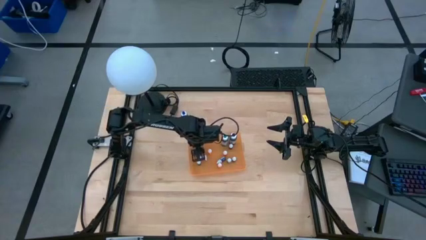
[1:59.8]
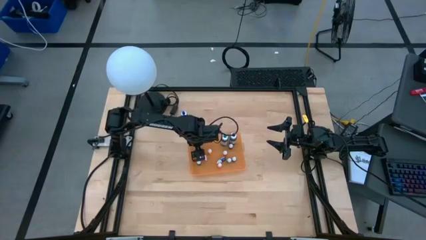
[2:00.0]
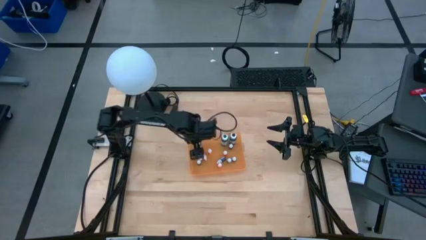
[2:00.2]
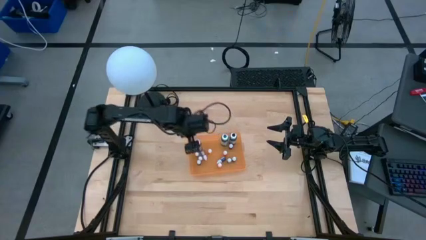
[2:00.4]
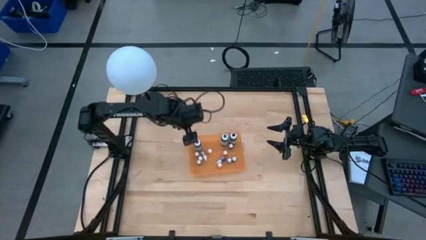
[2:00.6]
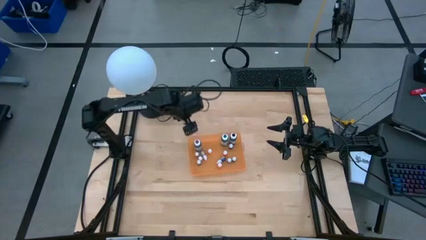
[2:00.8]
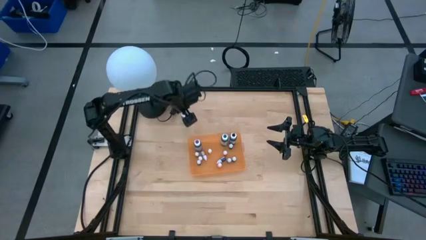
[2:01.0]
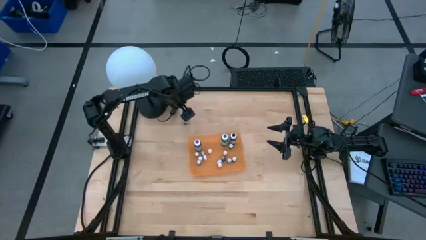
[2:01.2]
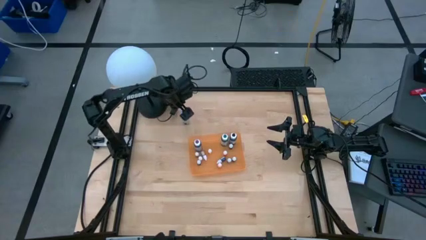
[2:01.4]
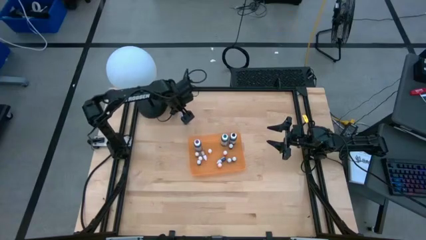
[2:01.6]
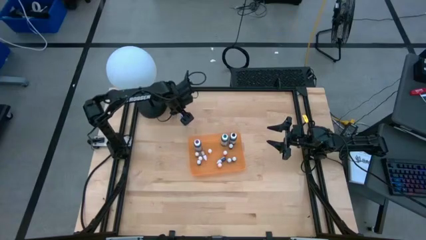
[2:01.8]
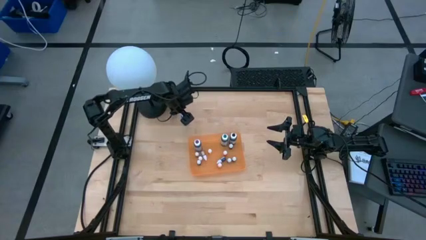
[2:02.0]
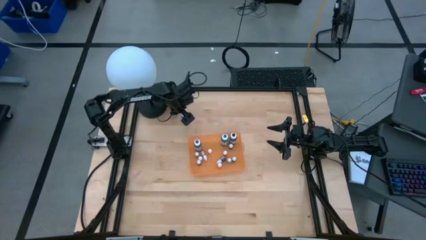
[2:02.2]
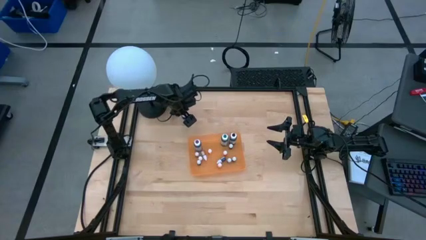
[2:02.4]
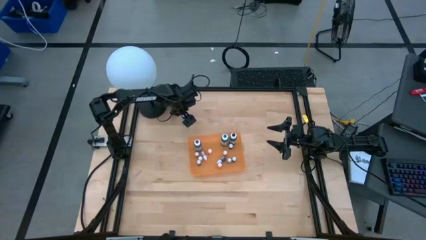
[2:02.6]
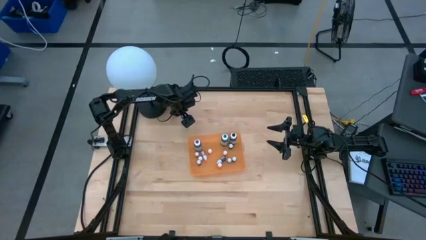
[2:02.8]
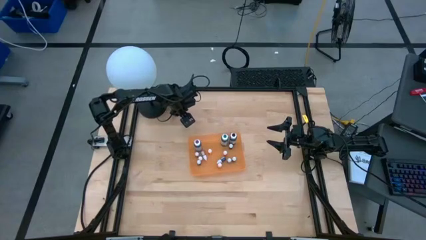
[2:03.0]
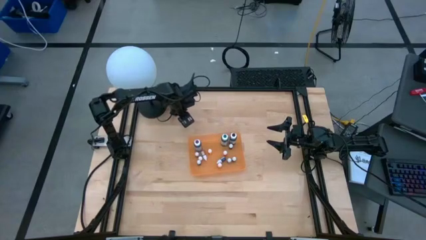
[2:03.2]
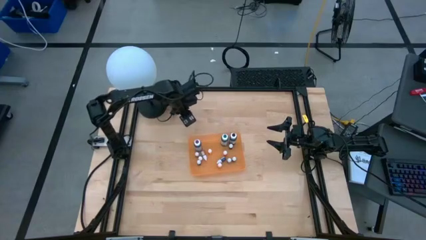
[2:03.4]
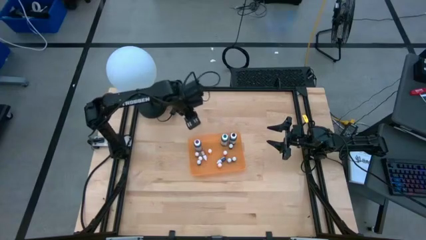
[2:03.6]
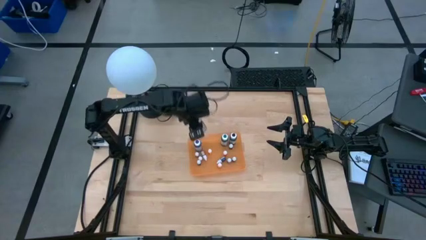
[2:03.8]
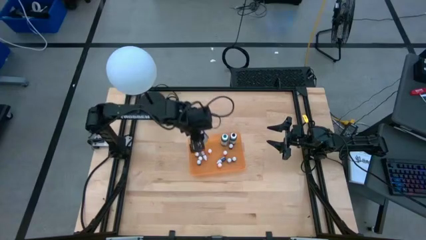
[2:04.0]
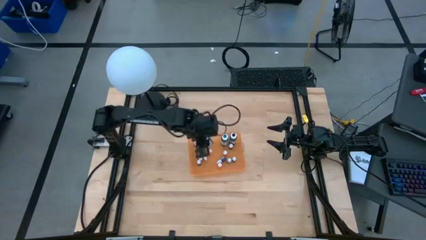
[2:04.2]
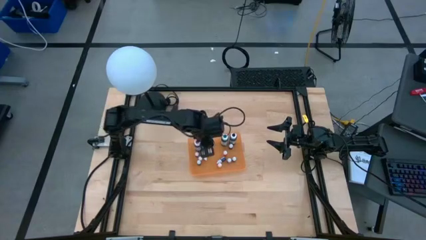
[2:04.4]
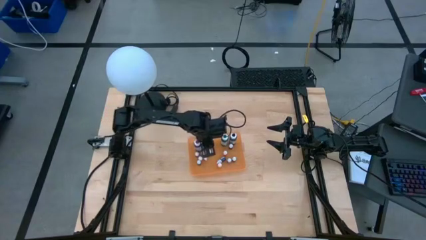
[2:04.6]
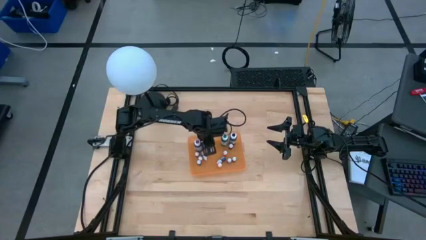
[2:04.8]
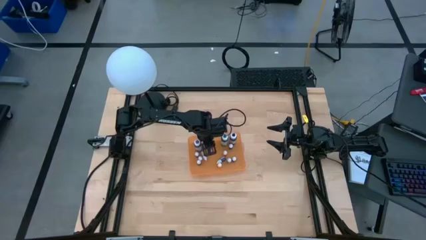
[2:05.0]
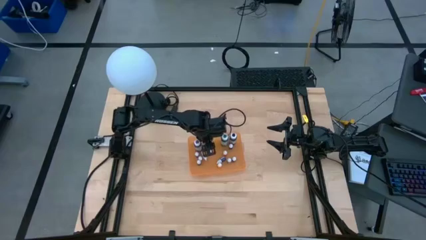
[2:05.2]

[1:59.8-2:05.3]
Task: Pick & Place food coloring
Put the large blue food coloring bottle into the orange bin

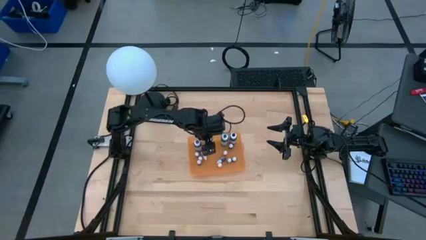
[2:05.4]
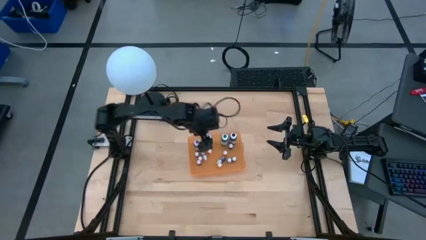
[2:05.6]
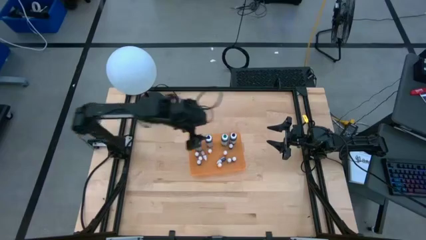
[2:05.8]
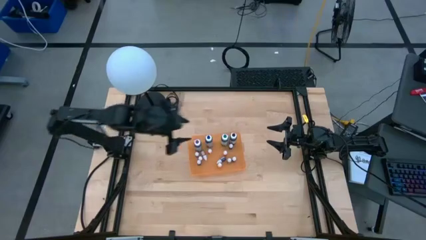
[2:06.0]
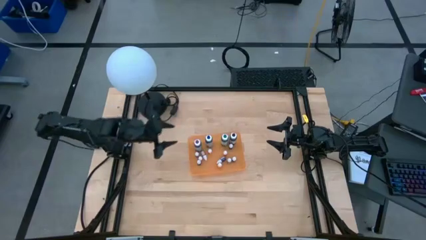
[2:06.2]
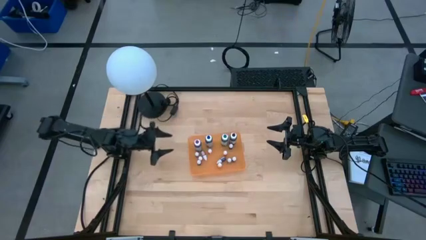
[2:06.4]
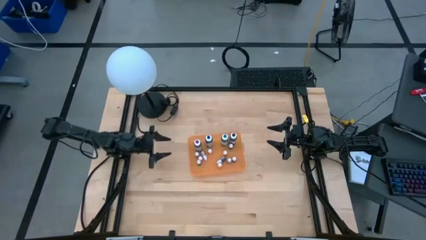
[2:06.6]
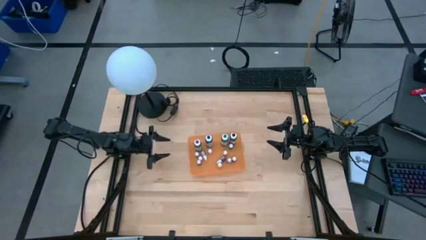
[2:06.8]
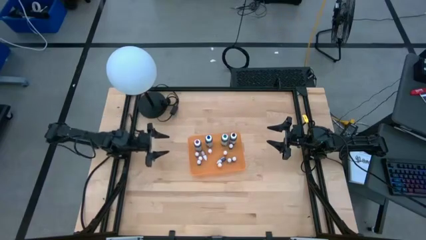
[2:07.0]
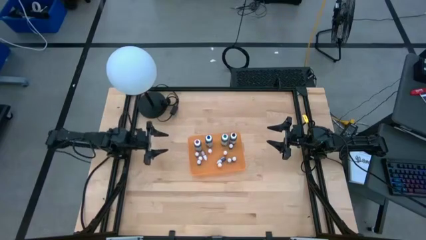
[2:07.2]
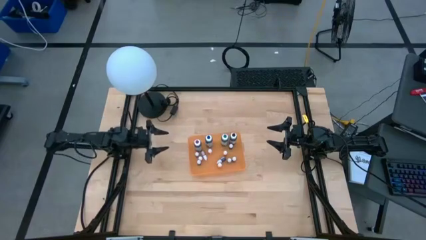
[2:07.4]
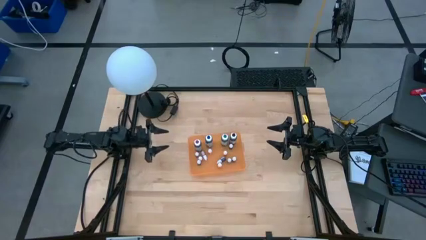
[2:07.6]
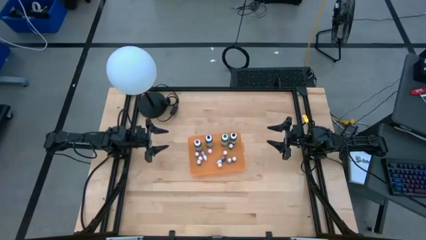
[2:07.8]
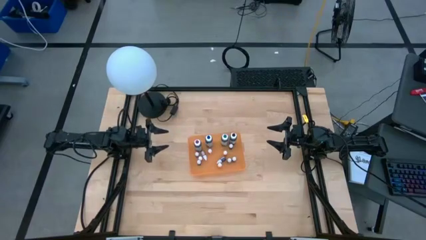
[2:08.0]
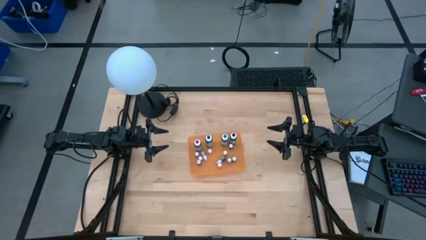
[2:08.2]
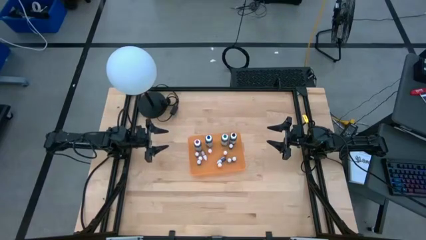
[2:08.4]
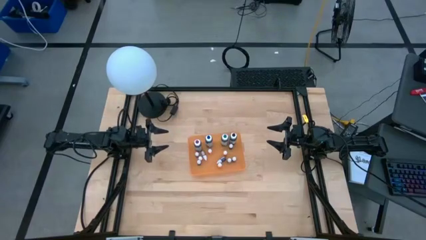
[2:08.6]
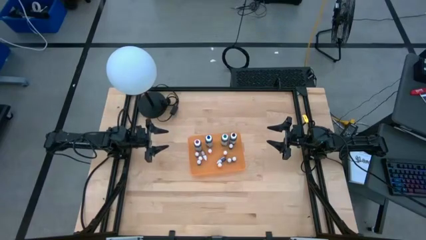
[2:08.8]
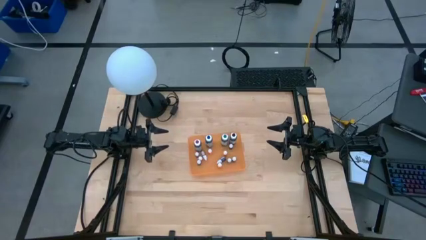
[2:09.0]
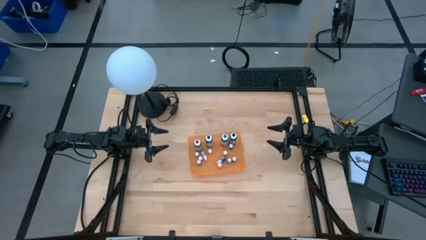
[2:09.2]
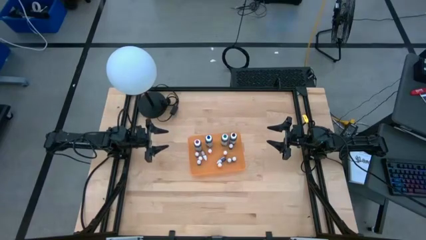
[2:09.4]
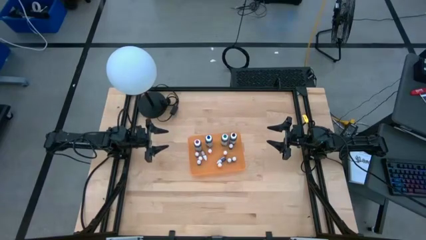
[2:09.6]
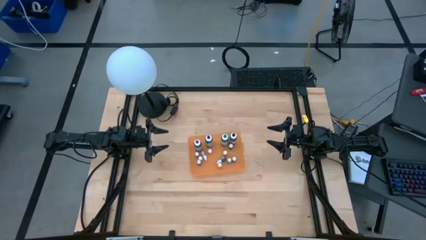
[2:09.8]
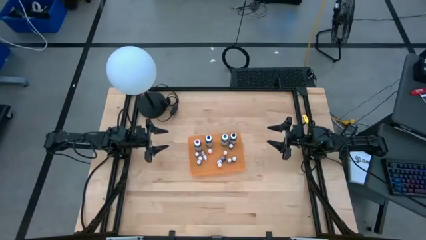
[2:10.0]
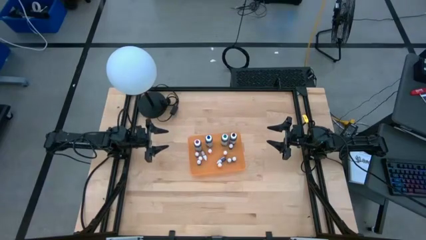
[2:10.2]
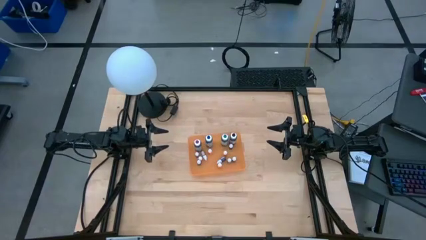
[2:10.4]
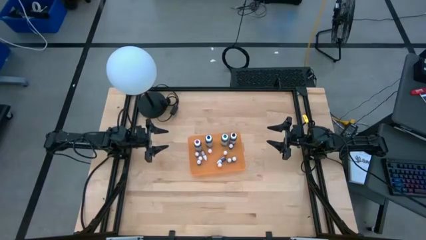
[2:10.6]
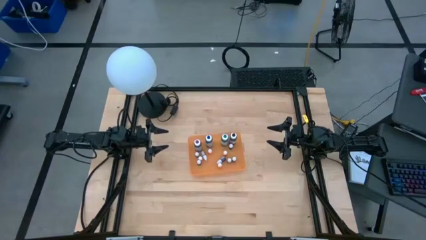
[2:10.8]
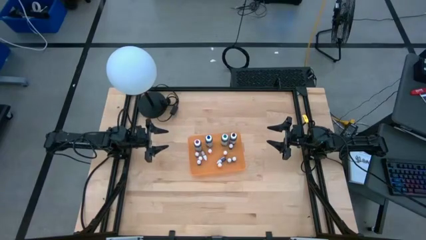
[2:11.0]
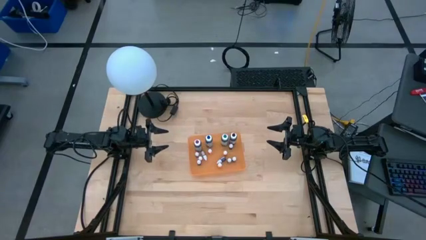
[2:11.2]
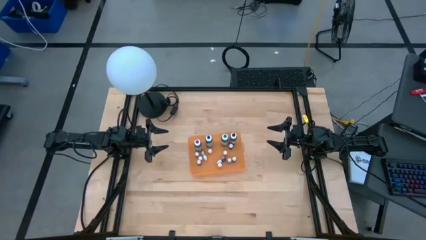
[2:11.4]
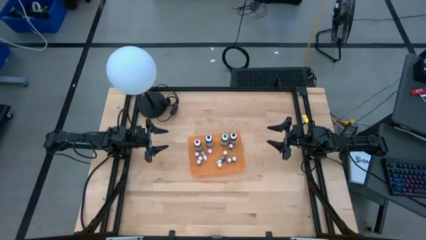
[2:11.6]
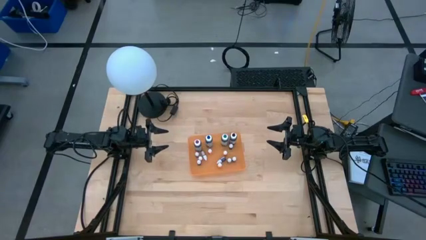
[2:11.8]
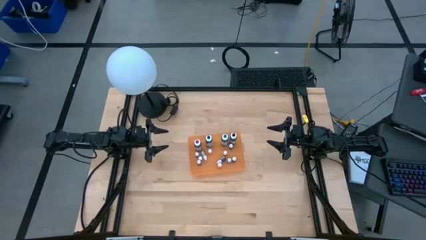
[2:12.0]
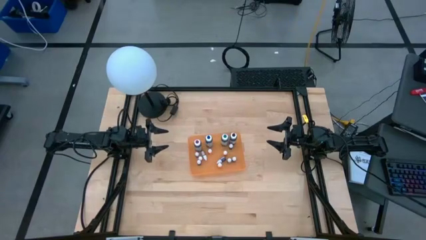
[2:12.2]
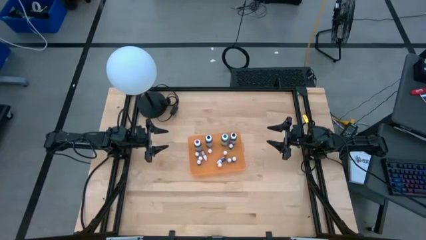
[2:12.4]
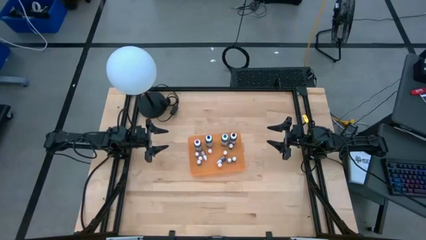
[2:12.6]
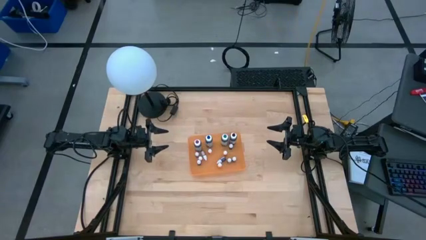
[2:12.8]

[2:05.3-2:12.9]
Return to Home Position

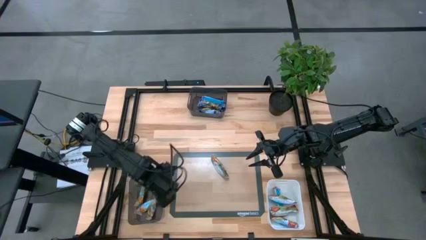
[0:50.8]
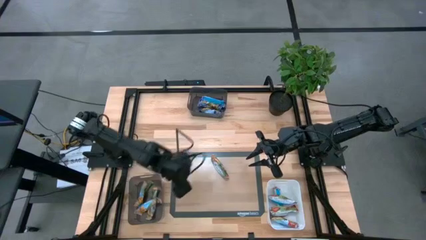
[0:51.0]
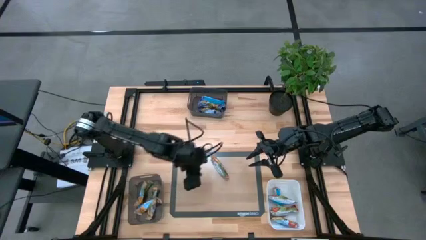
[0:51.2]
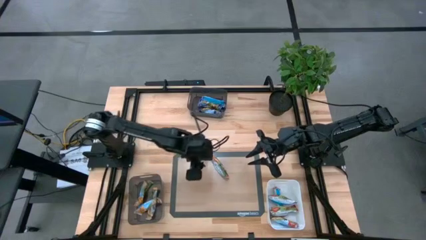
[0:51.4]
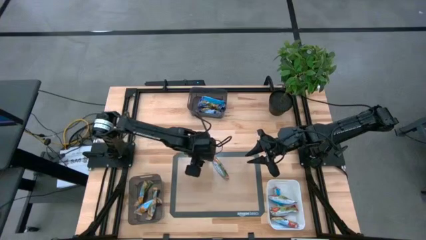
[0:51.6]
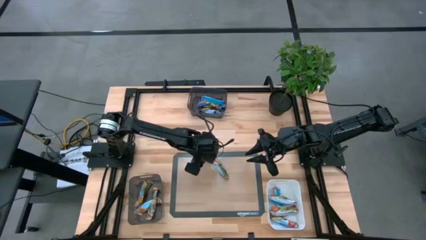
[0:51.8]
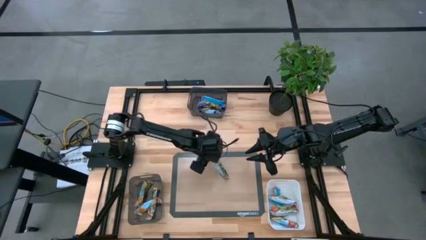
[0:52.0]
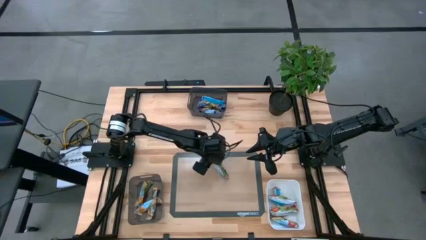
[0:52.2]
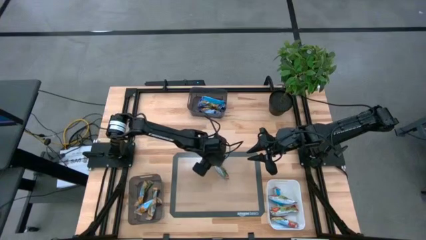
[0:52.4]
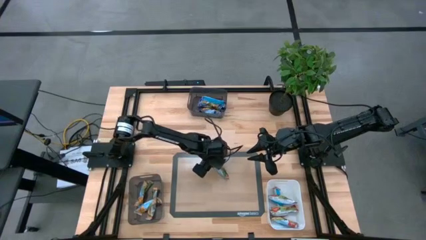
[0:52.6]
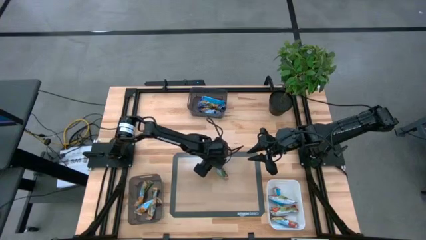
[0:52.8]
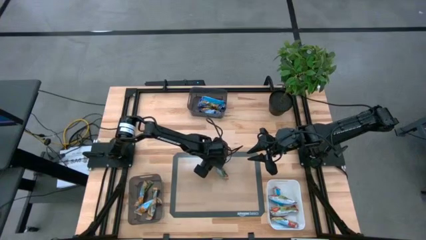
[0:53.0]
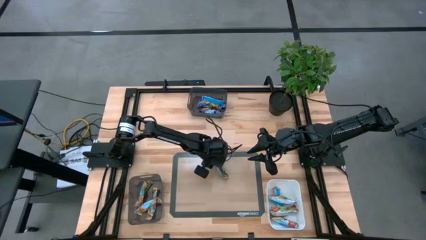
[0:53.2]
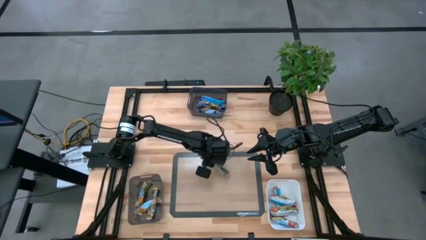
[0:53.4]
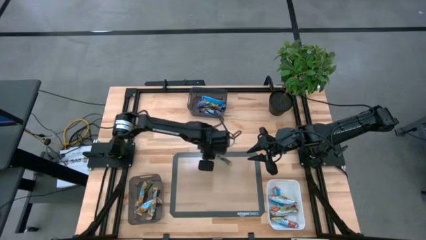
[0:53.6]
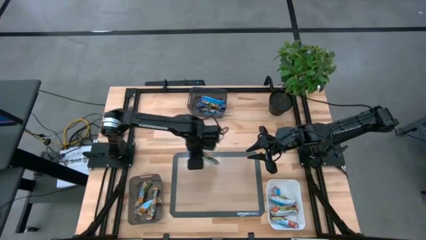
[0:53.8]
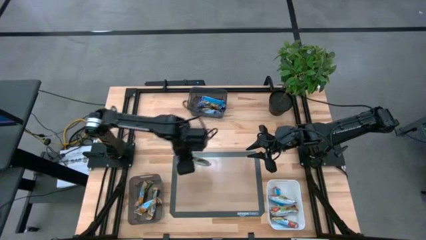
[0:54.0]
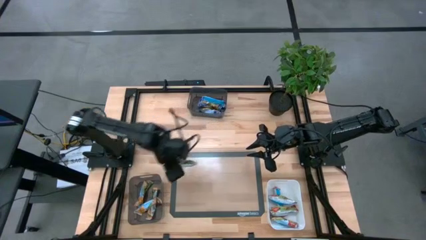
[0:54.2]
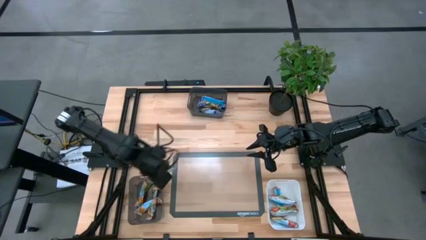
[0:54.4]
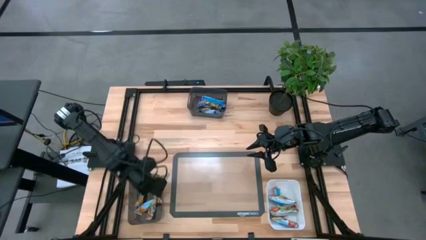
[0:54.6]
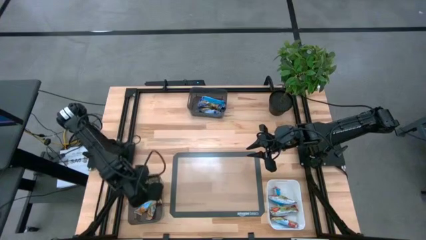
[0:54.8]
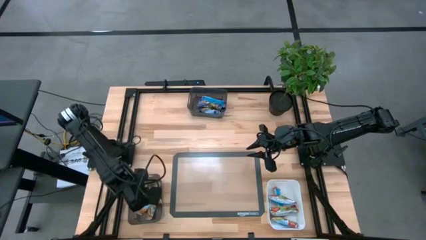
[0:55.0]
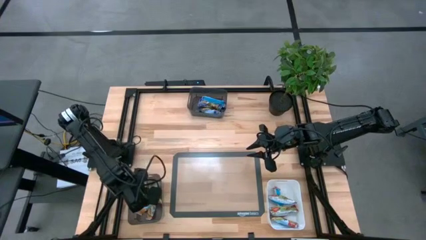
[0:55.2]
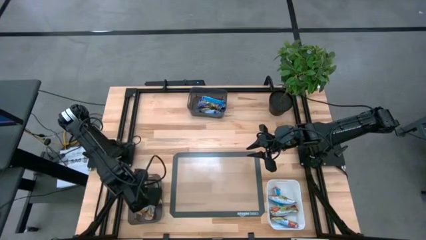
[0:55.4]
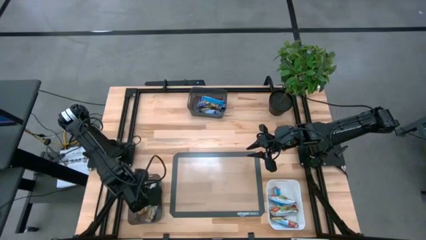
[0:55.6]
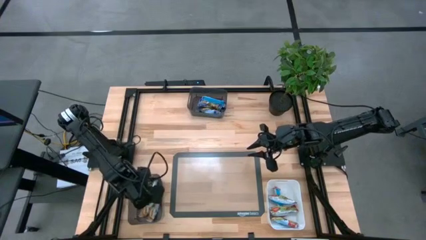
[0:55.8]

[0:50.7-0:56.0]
Task: Pick and place Granola Bars by type
Put the orange snack bar into the bottom black transparent bin
